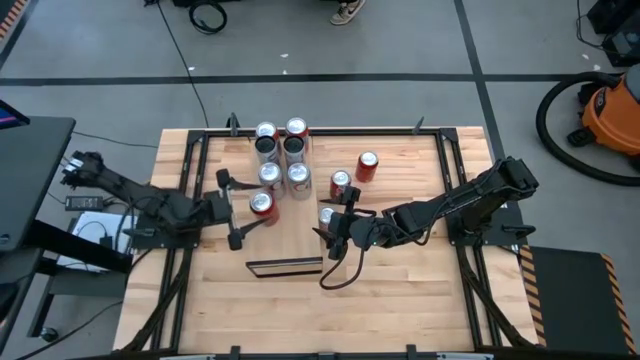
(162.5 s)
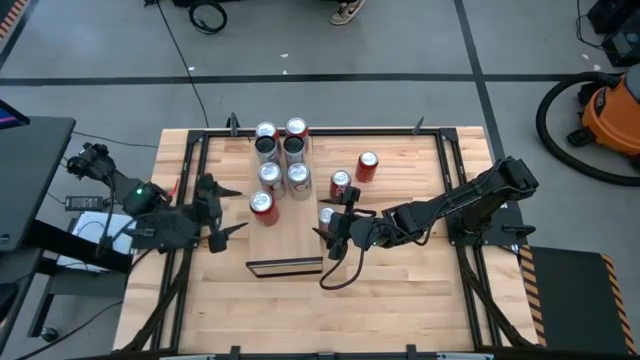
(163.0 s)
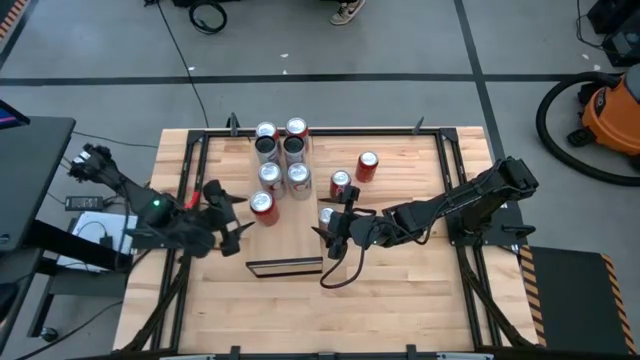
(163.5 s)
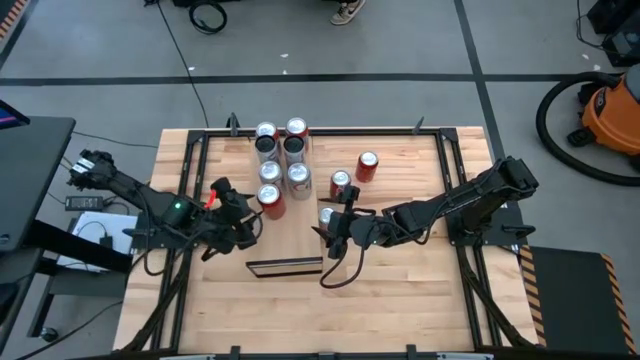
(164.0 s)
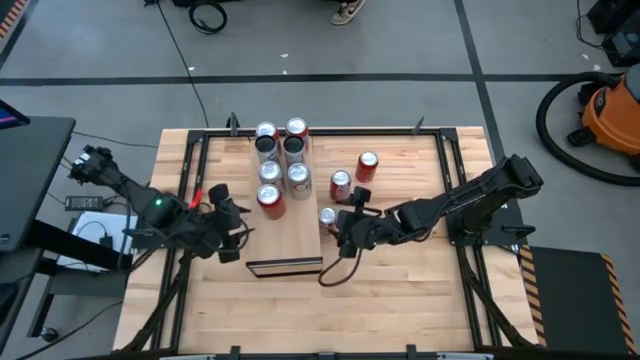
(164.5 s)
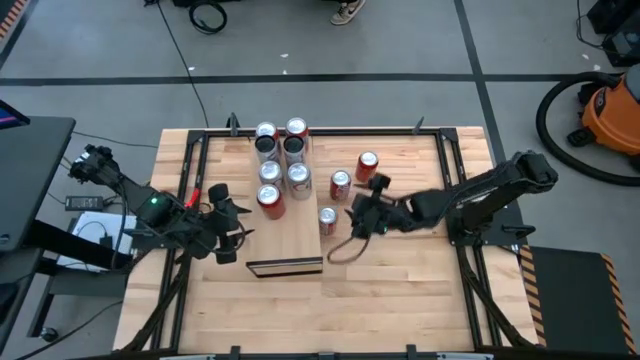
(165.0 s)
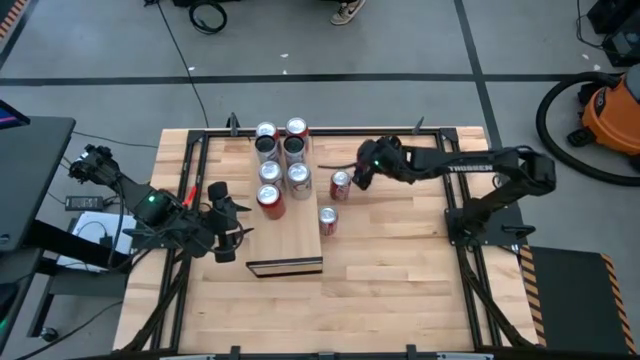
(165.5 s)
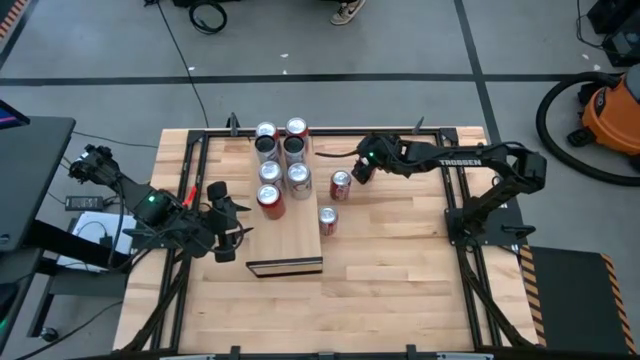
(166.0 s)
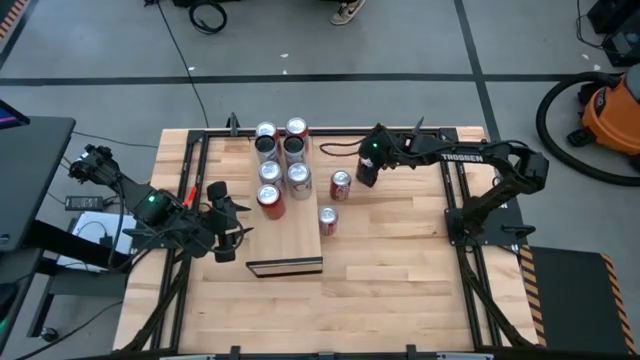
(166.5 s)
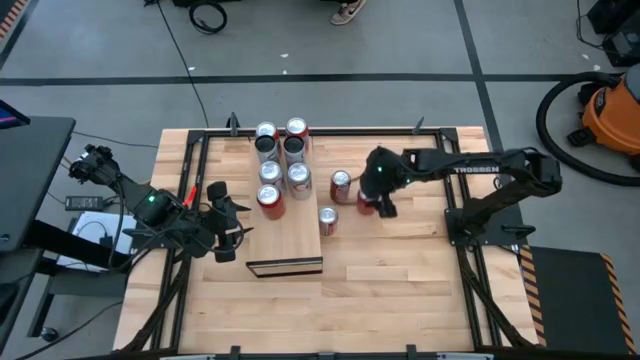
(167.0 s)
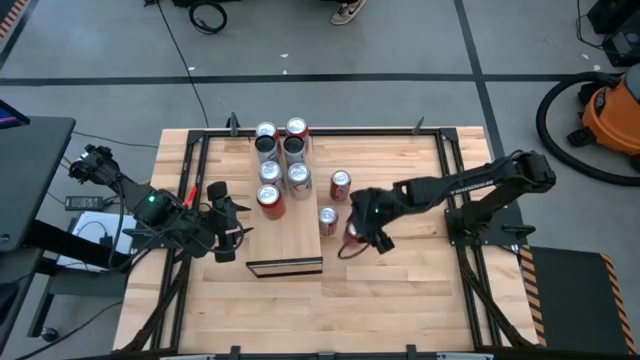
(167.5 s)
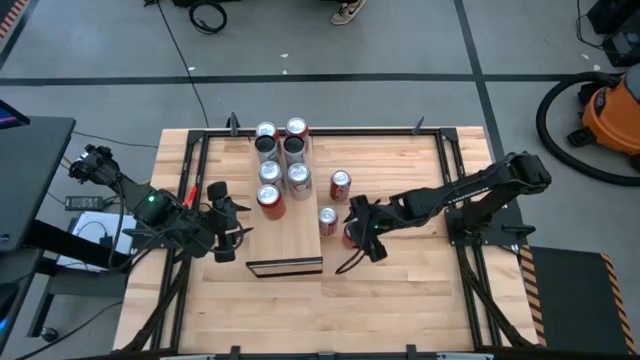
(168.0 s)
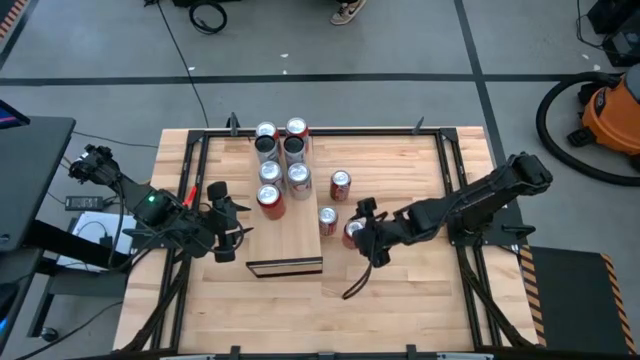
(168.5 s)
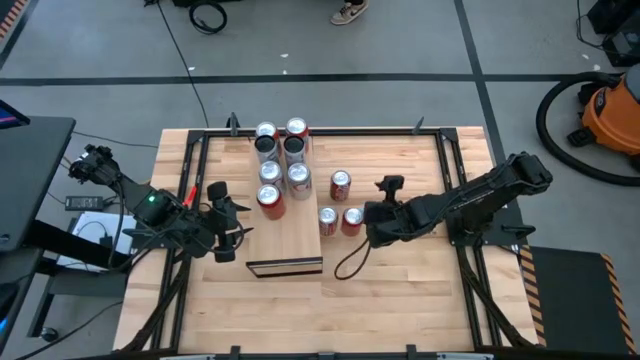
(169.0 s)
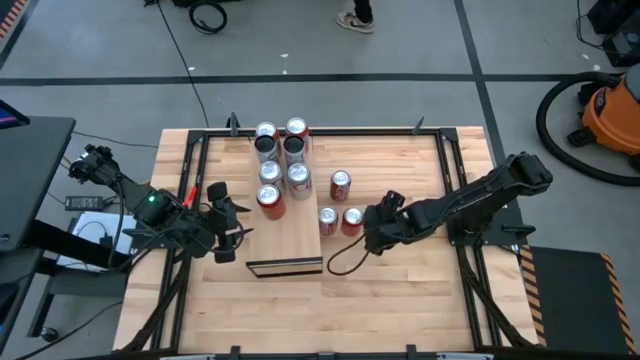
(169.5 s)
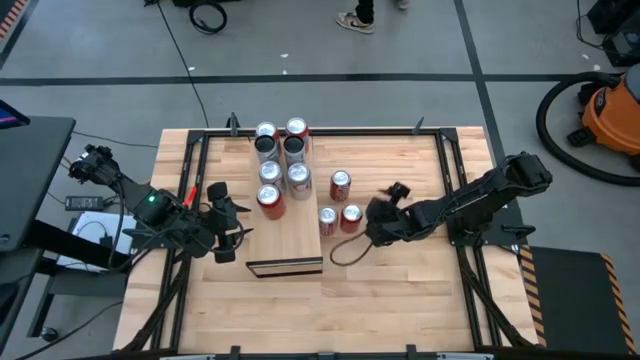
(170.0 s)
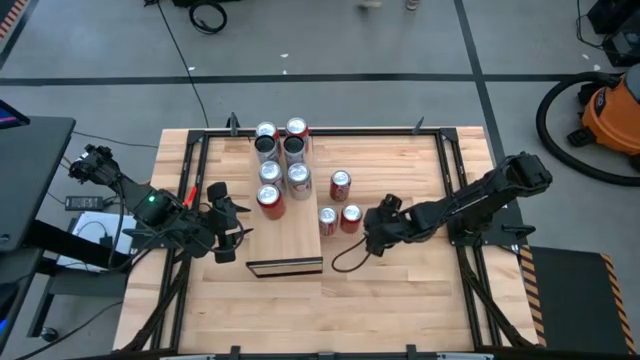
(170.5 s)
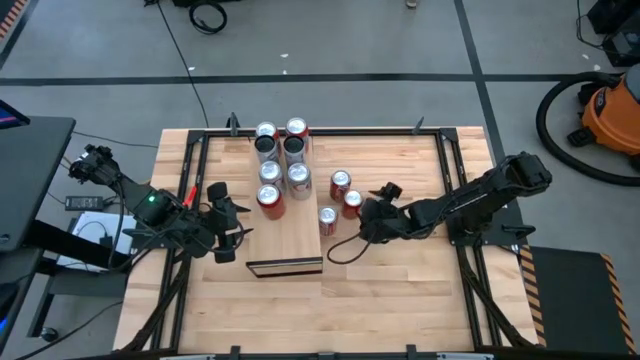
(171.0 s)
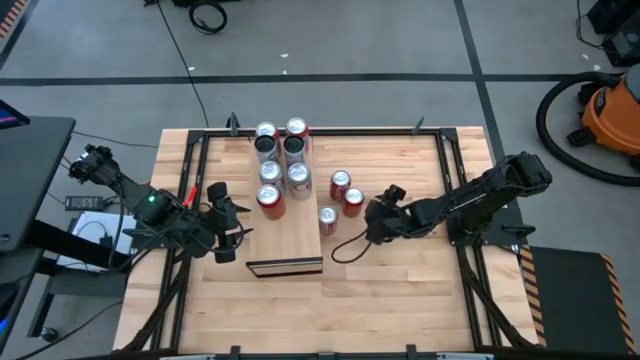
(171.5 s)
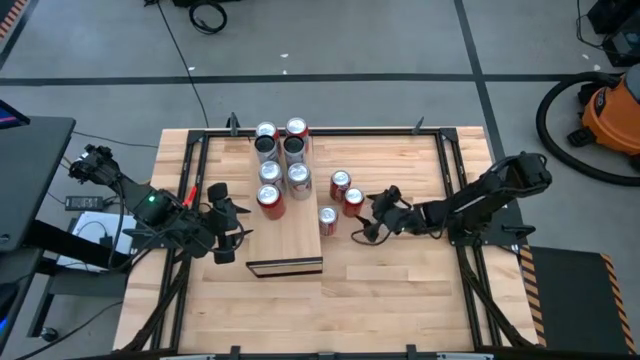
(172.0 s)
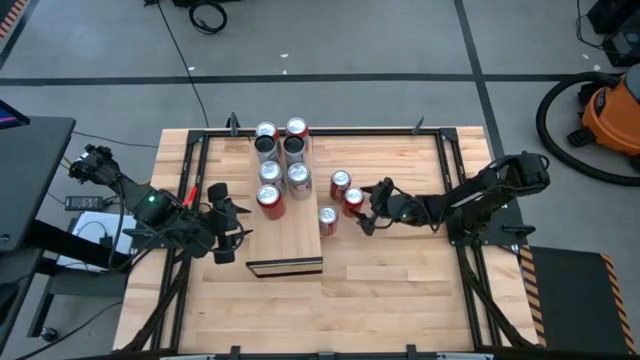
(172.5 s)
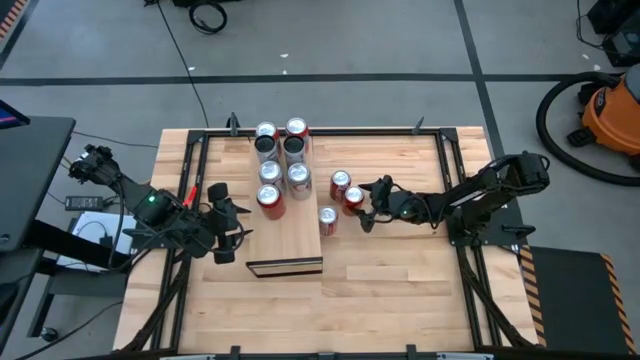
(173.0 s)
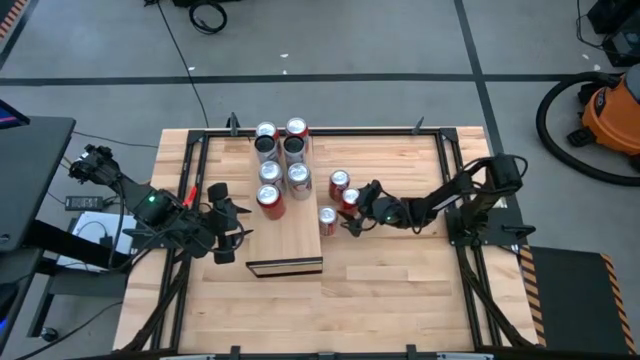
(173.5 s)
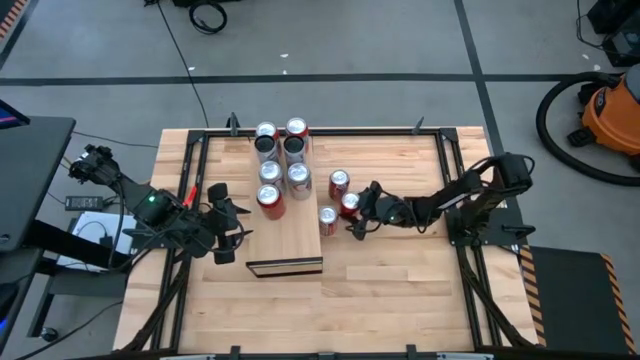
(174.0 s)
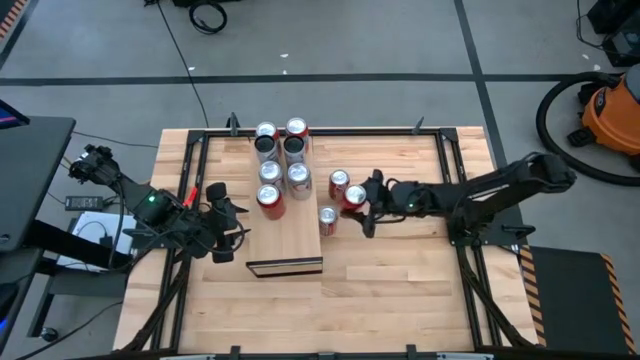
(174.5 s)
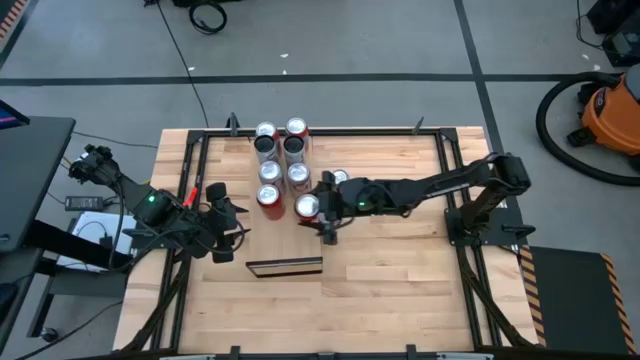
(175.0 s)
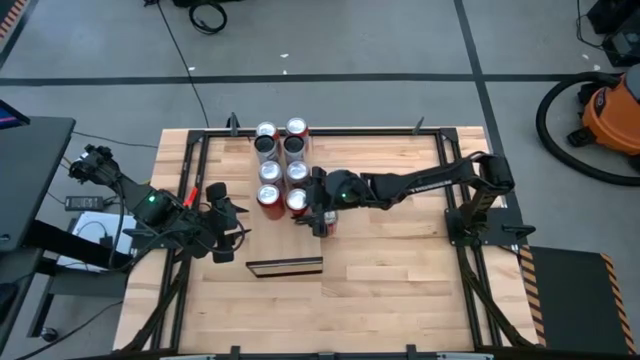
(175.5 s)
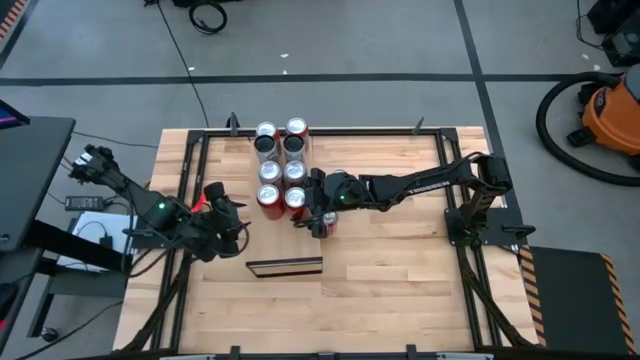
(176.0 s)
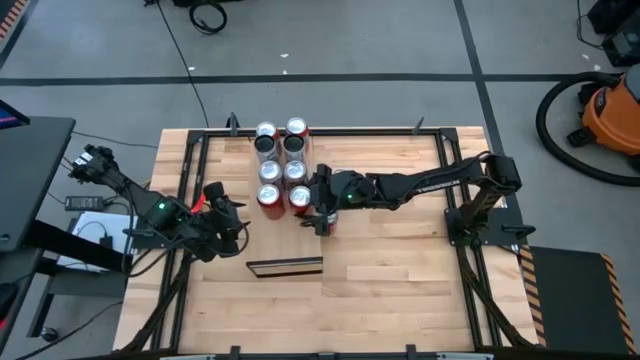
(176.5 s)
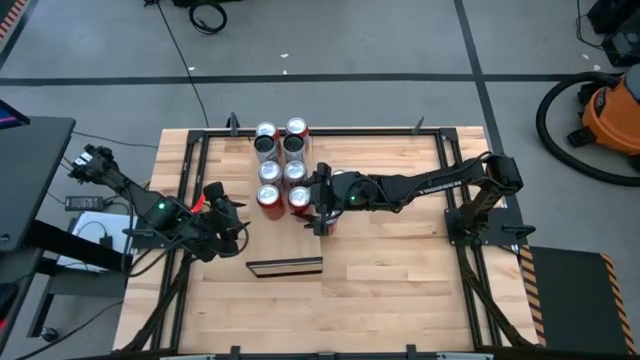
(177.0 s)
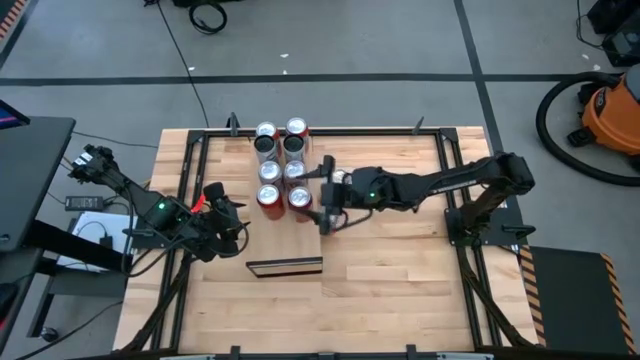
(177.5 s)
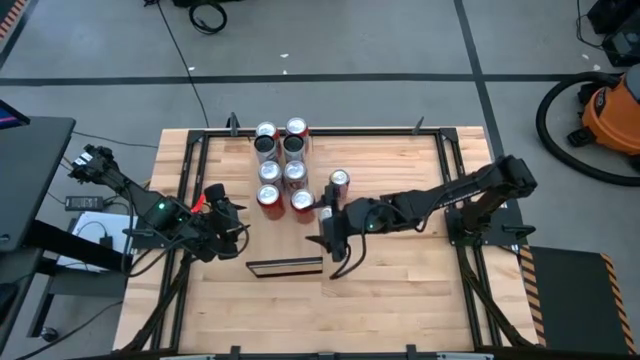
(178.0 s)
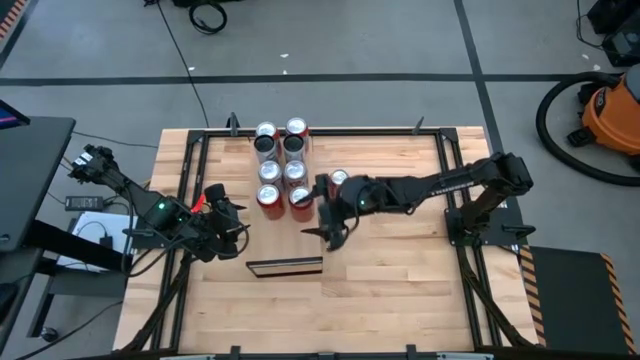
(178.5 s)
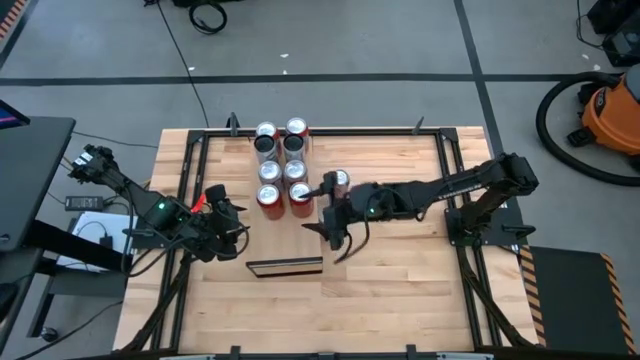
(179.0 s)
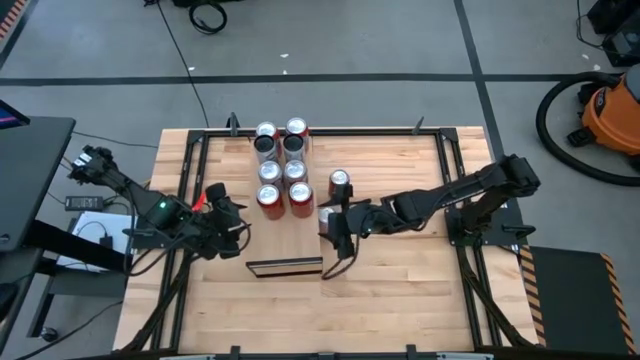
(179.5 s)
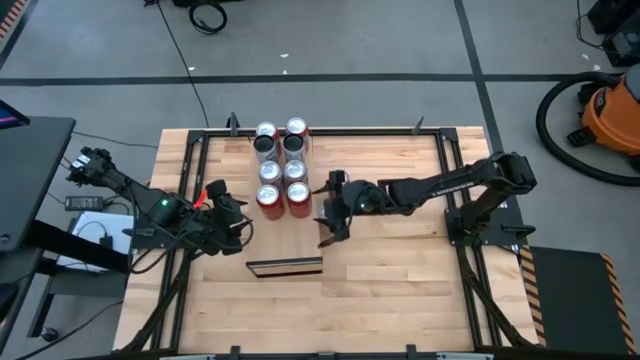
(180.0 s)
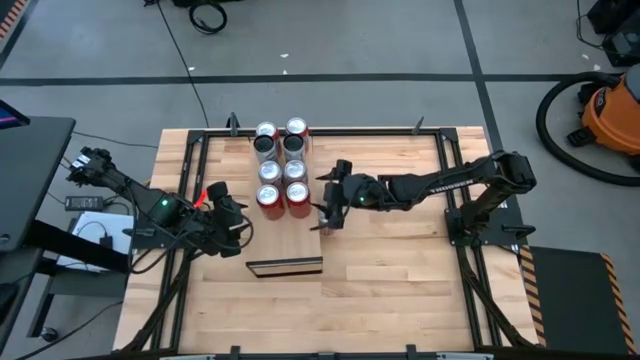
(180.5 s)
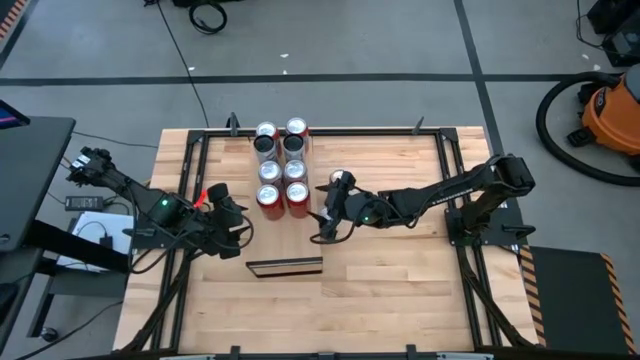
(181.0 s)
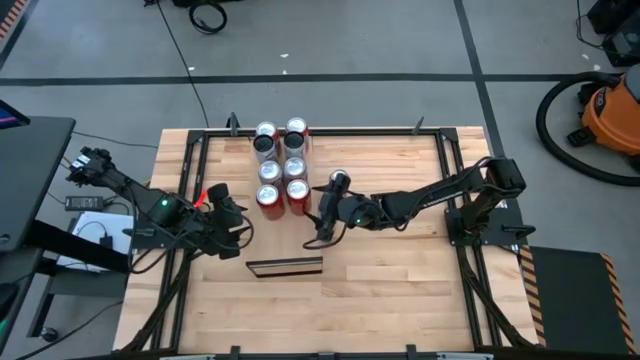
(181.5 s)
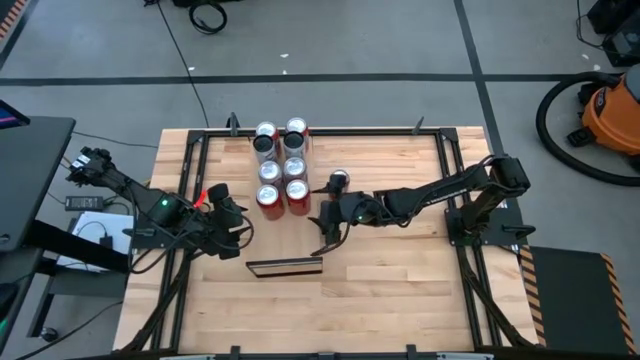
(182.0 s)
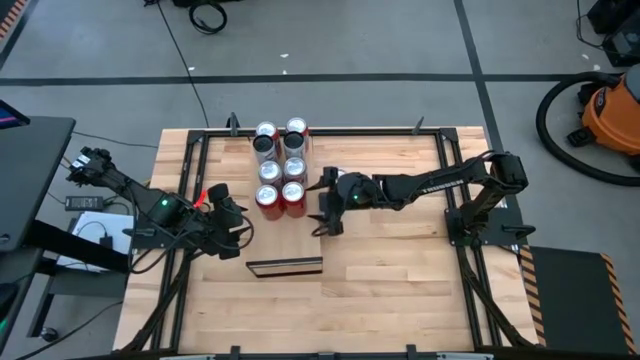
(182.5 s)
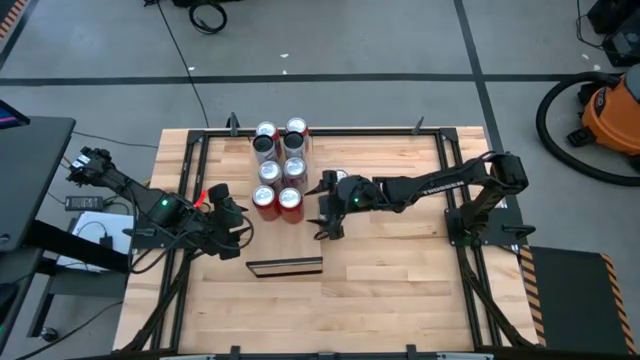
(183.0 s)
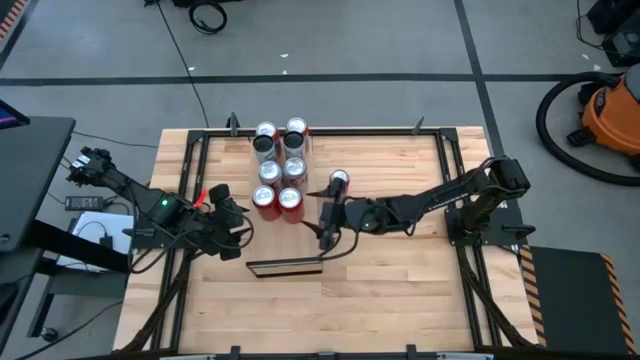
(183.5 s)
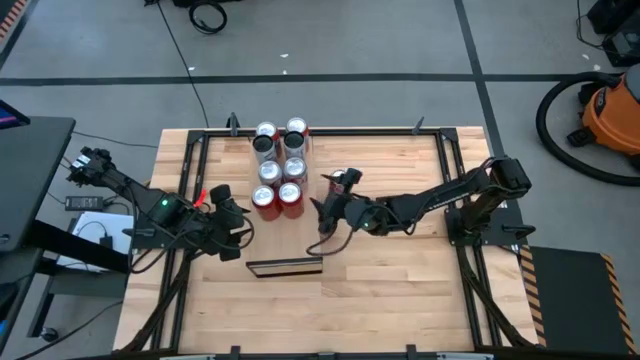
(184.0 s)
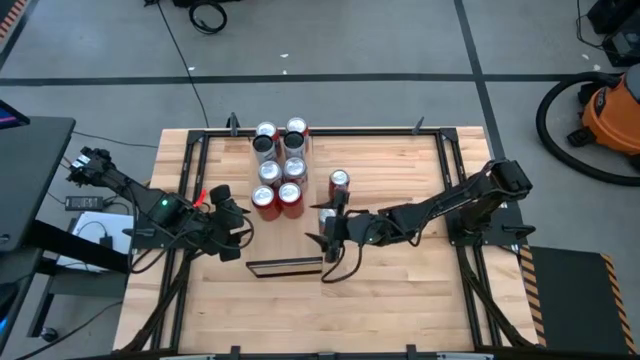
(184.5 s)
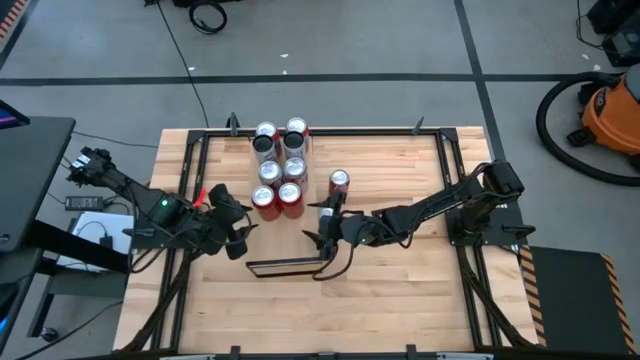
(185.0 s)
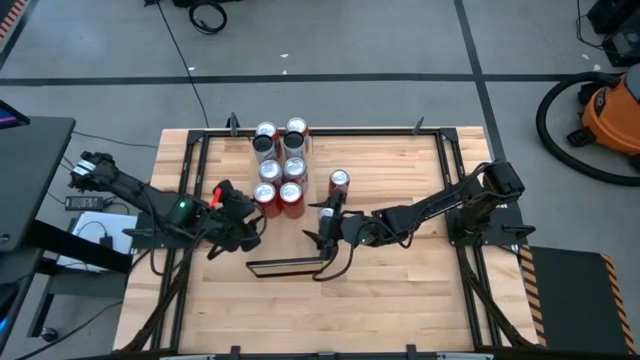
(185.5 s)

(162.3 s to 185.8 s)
Task: Place canned beverage on shelf
Put the red and black soda can on the shelf and align it with the other red and black soda can
